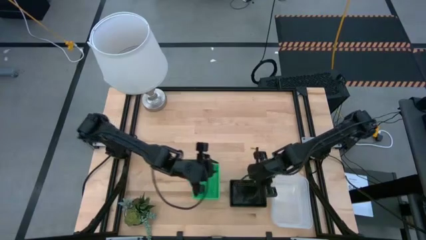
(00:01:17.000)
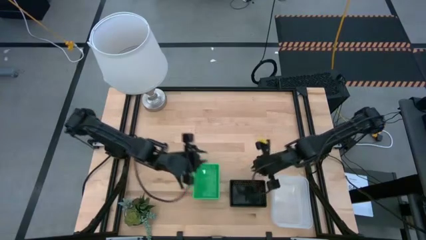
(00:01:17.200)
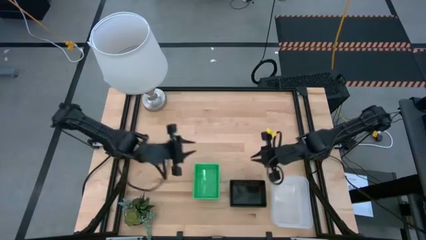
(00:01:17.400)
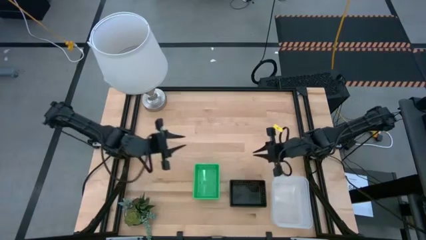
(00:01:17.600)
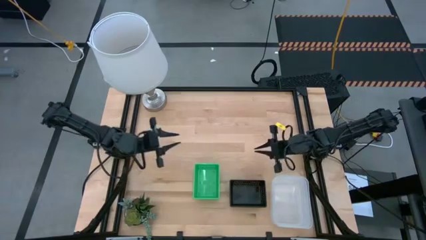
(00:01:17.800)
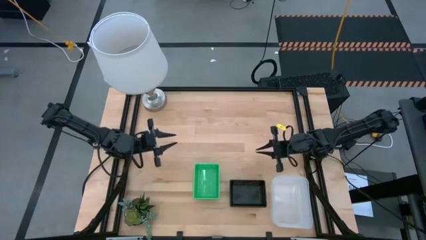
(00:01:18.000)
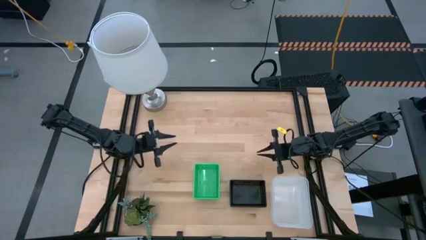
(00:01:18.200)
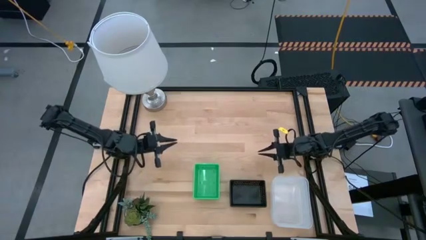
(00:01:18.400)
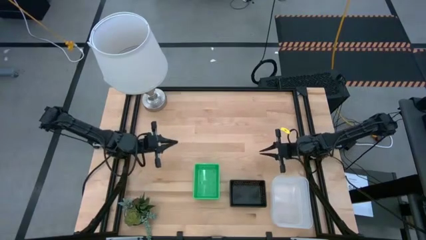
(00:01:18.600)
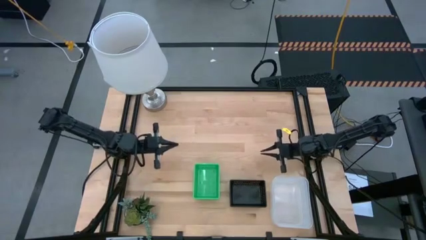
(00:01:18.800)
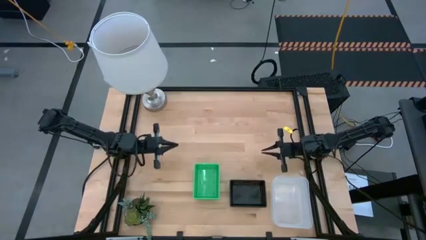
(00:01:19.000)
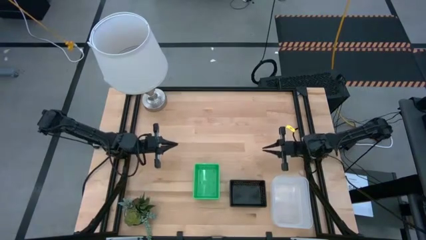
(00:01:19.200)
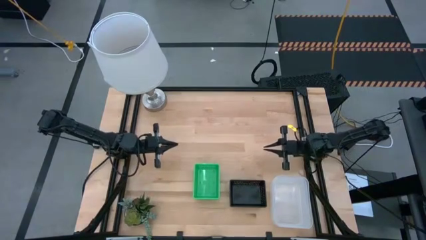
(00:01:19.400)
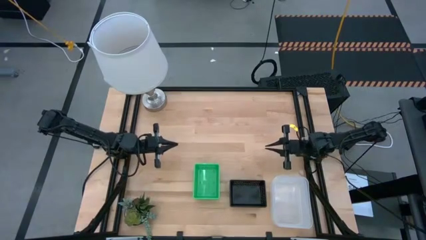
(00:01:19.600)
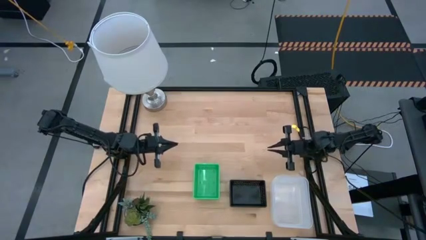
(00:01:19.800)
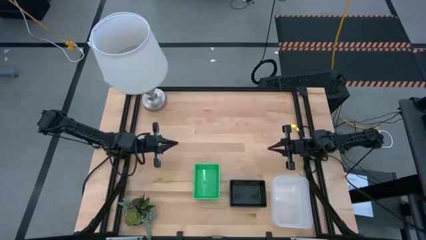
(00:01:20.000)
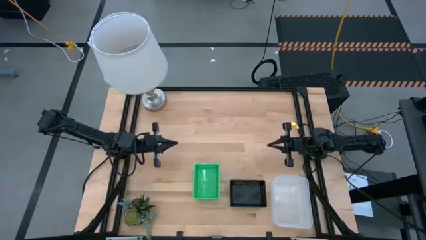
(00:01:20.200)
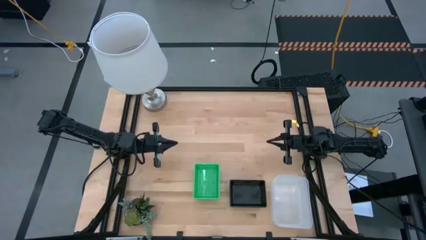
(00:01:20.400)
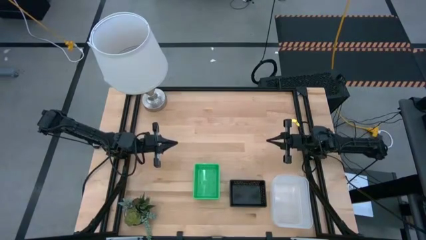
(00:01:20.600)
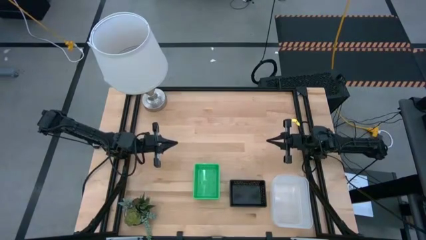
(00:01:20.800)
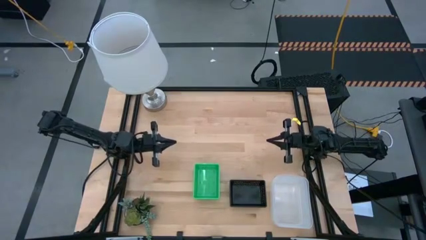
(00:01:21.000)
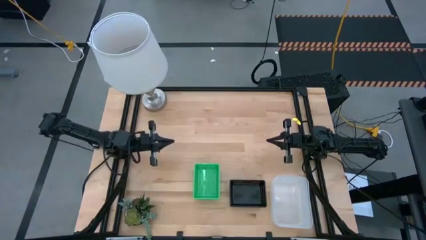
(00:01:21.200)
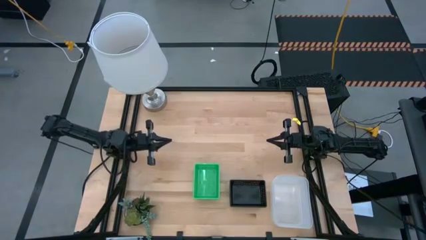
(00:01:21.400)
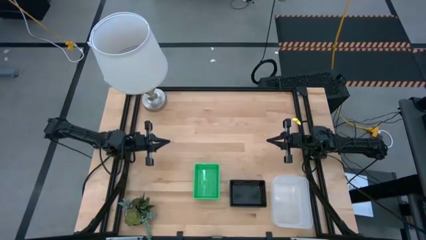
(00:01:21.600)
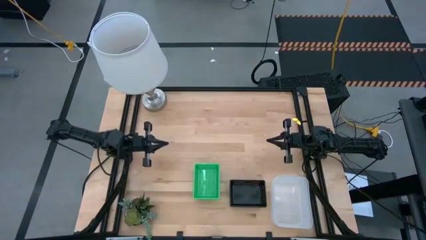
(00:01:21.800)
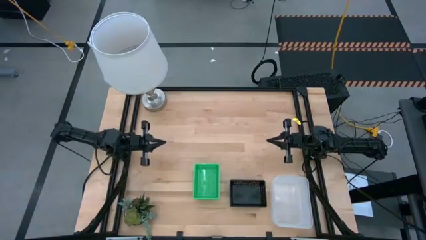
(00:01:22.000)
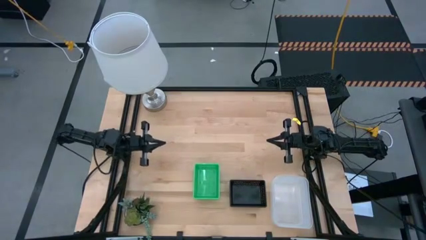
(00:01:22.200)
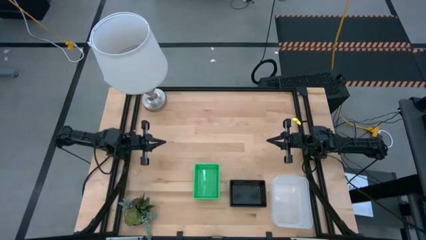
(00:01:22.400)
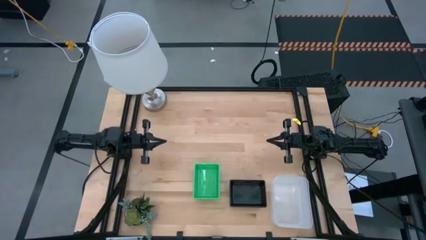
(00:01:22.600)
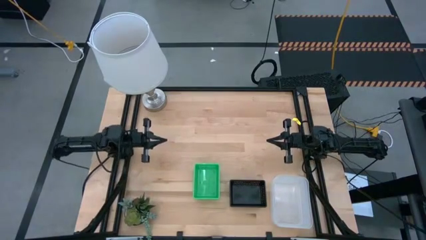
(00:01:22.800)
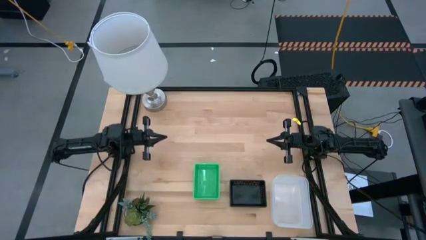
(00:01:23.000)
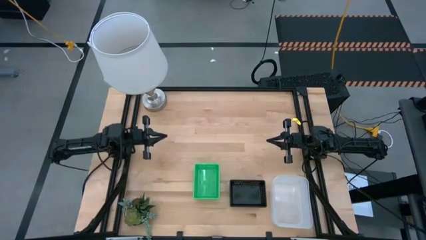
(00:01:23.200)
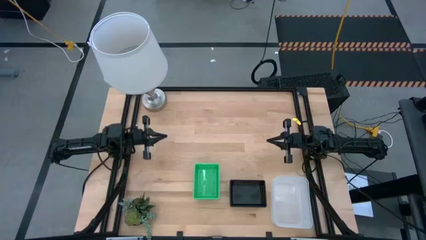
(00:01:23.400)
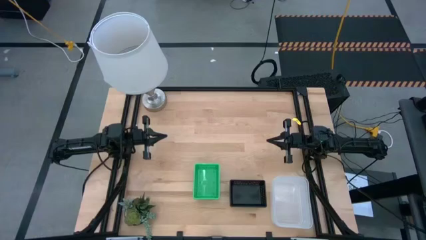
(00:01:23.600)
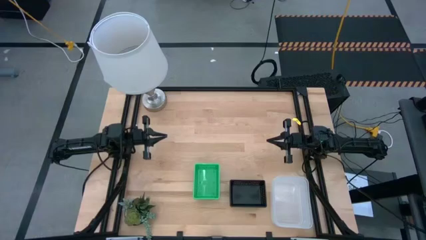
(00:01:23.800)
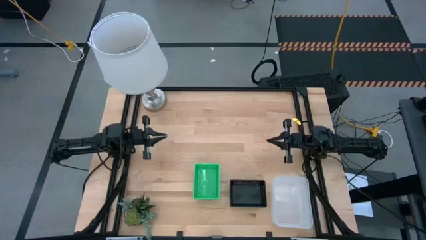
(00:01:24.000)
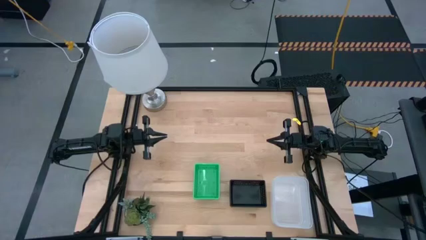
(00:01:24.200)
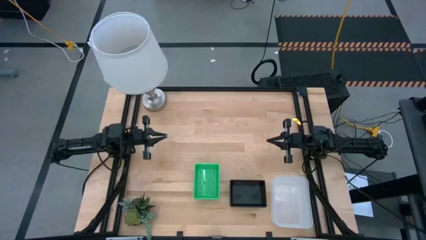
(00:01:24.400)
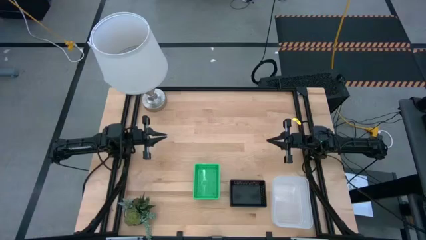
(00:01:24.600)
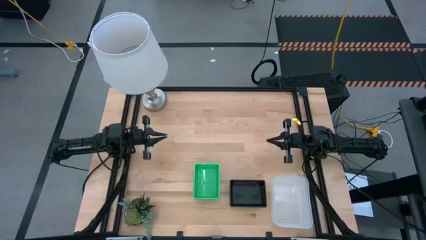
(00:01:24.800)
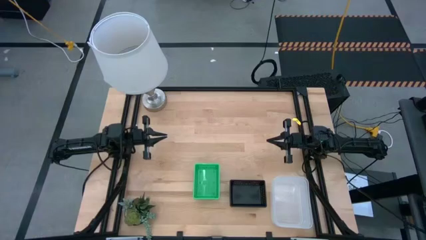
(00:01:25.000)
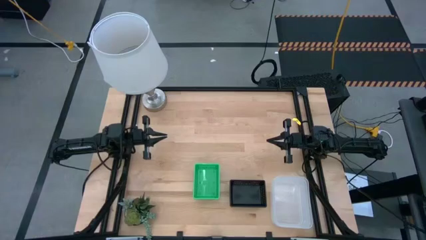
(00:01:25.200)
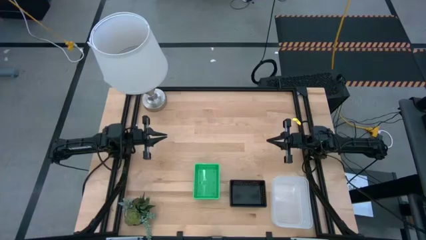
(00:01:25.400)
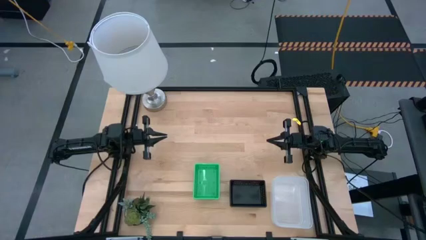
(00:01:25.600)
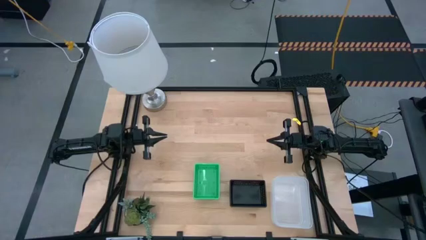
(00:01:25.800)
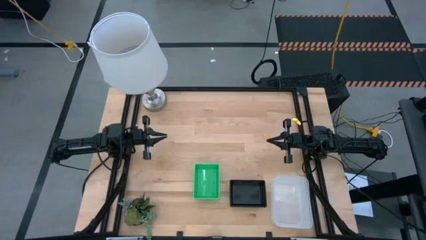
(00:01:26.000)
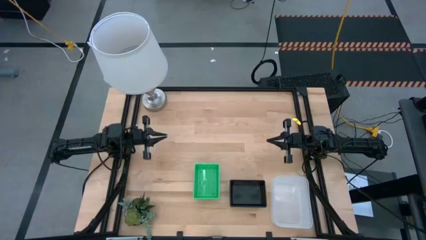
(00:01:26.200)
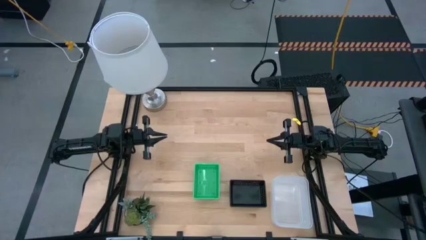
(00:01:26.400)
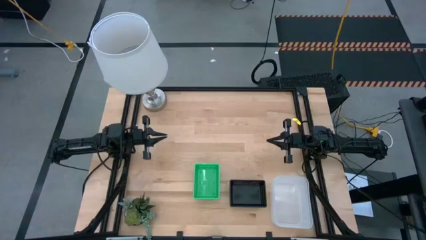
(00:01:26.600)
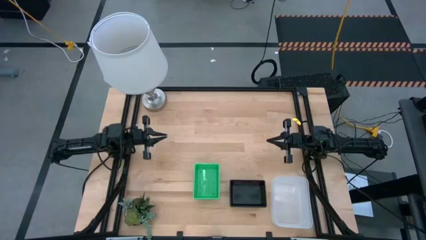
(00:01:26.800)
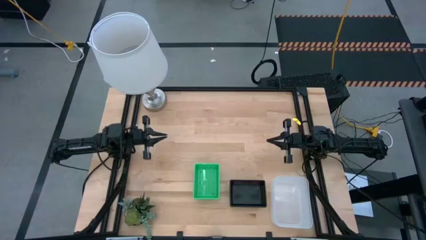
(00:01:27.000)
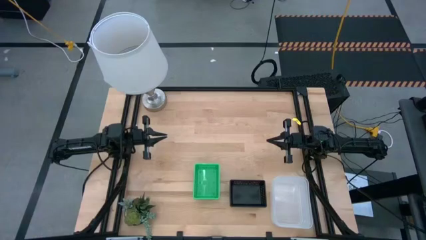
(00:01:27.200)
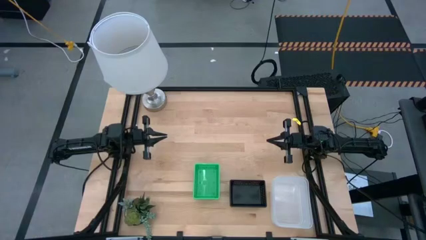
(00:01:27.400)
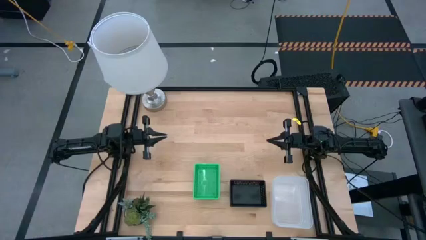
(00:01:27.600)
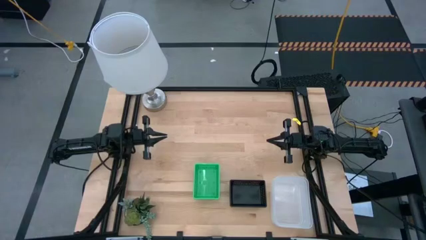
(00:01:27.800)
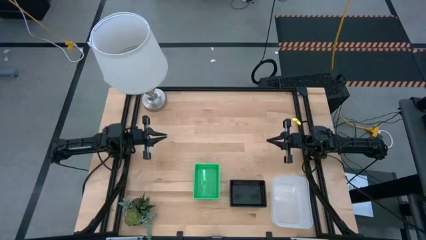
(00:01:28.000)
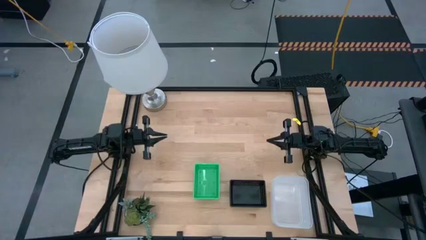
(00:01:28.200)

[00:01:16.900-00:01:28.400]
Return to Home Position
